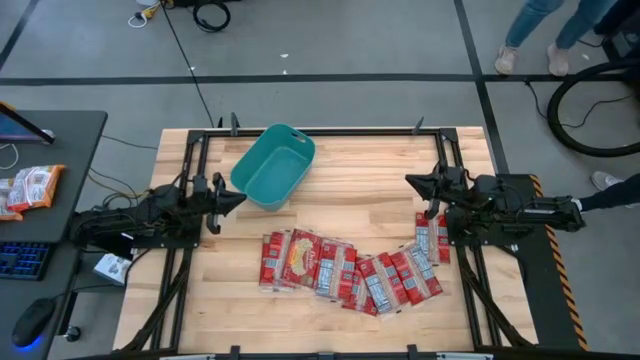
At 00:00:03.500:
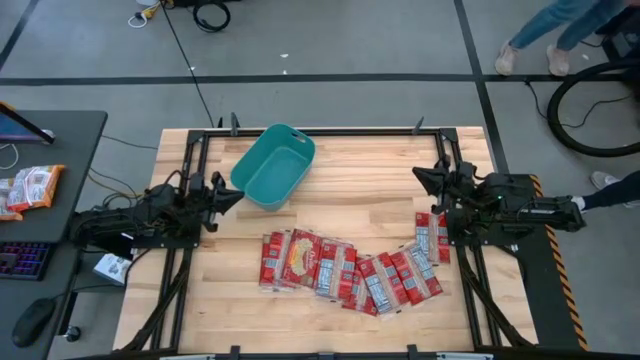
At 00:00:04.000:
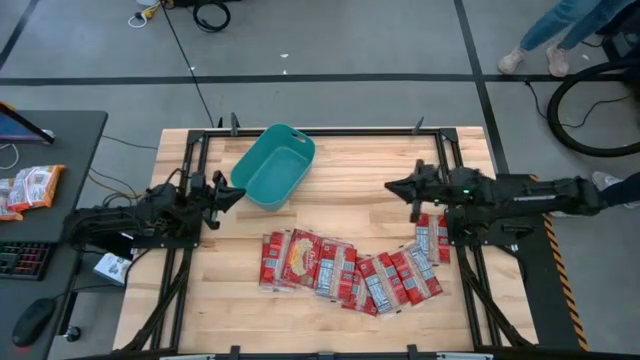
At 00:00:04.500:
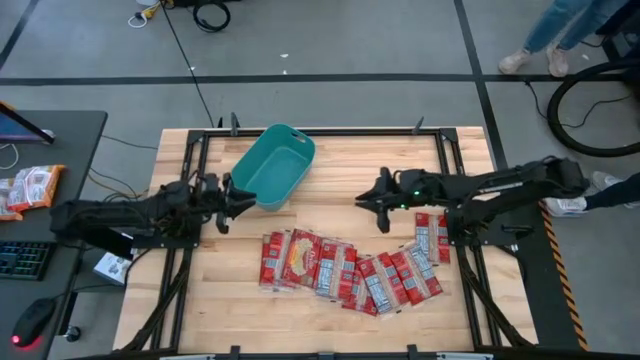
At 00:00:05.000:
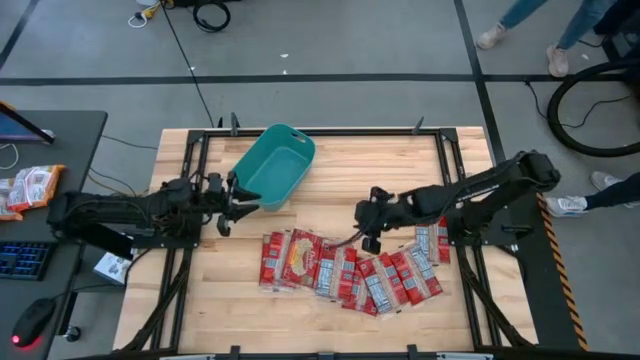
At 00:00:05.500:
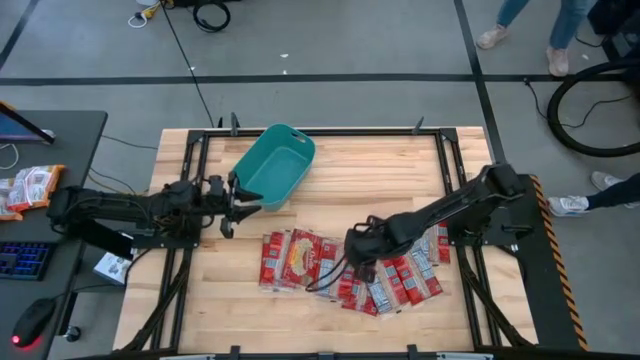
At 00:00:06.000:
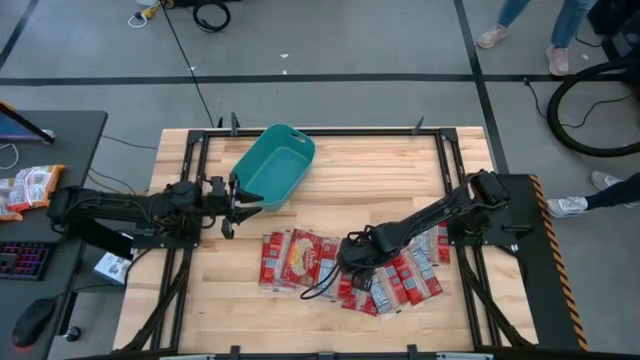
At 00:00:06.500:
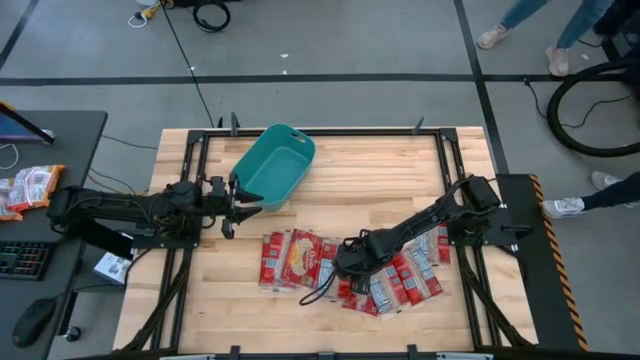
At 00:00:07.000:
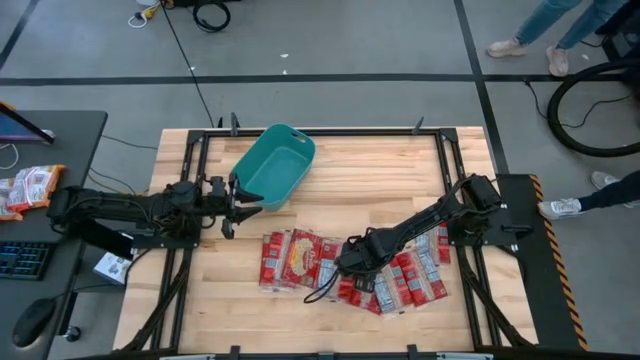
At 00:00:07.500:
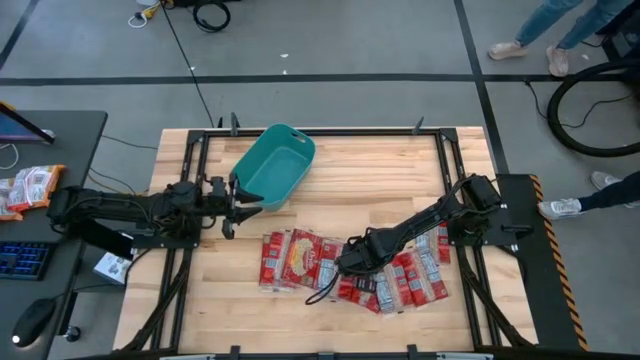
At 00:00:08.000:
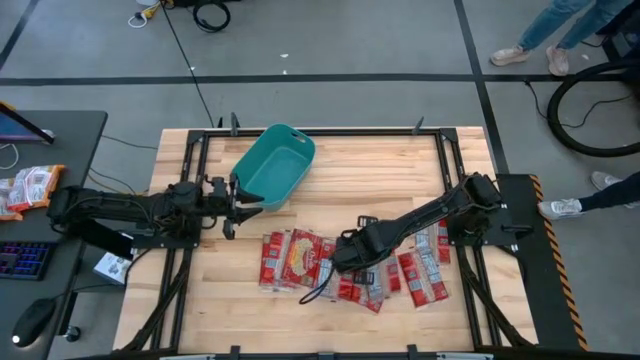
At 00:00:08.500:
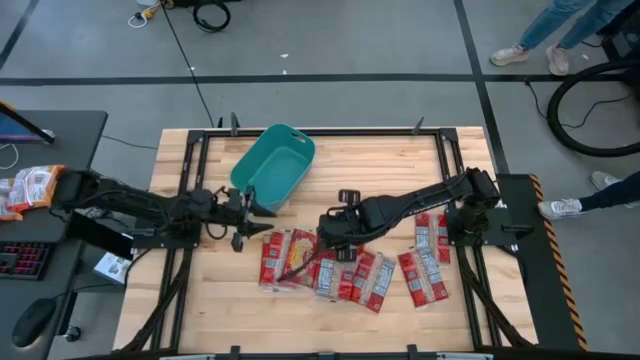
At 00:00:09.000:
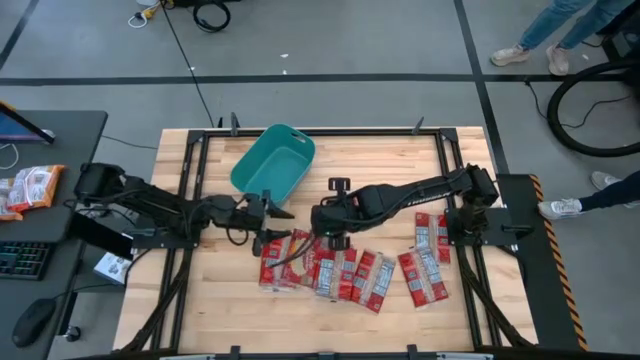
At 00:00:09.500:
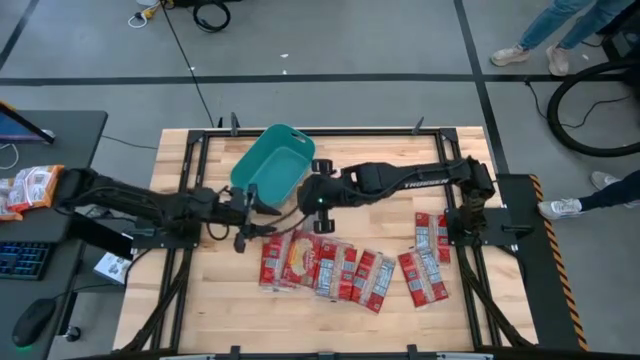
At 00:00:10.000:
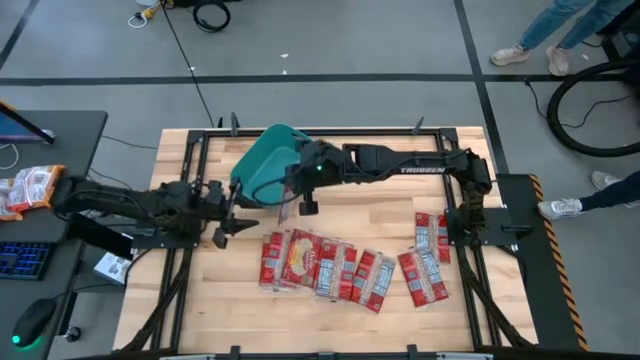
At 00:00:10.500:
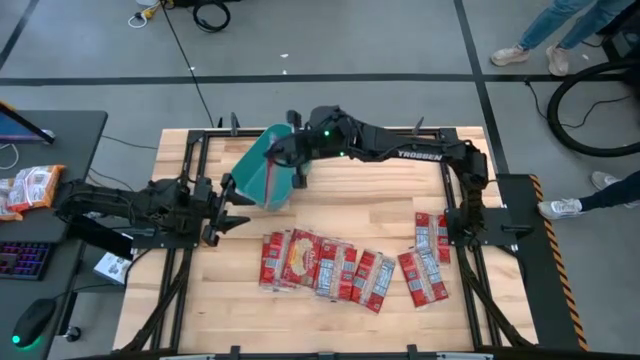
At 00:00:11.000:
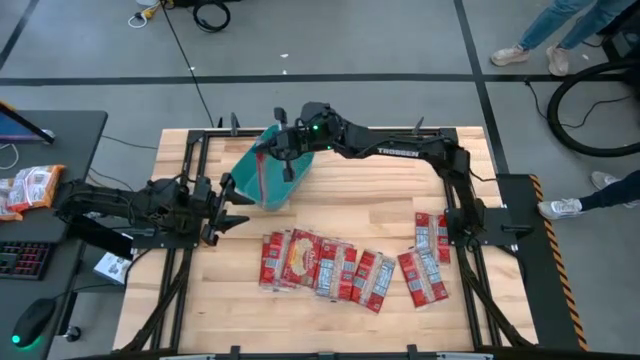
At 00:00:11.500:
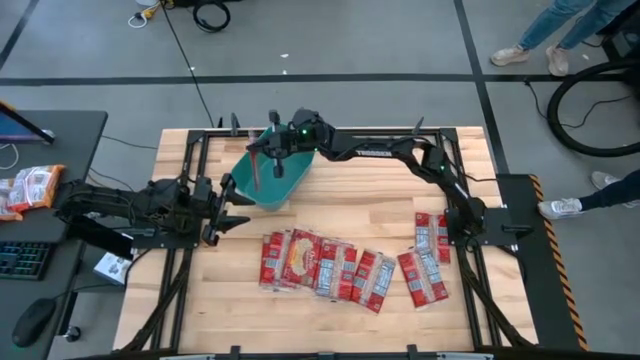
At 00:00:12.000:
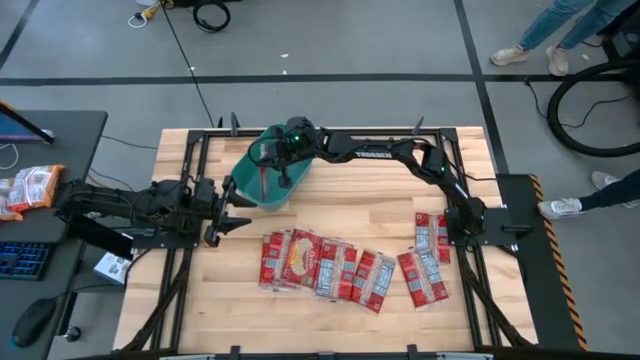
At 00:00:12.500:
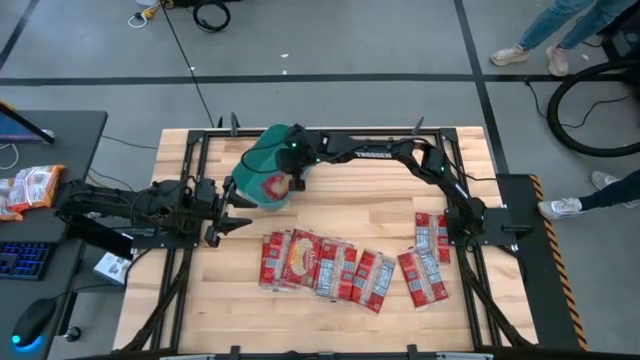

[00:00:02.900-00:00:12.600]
Task: Sort popcorn bags into baskets
Put the popcorn bag into the green bin

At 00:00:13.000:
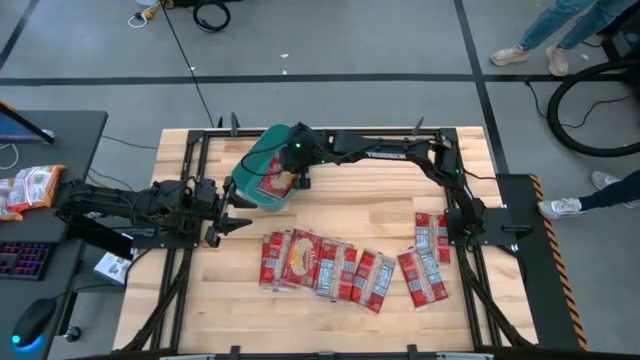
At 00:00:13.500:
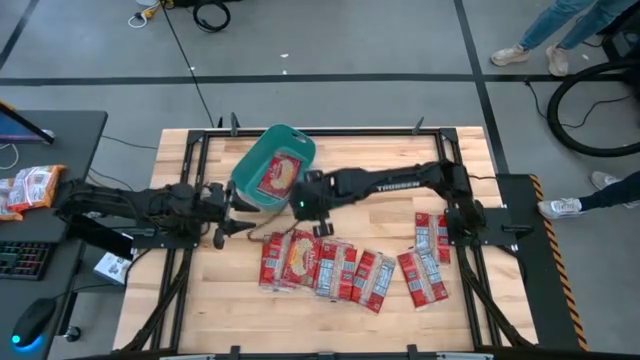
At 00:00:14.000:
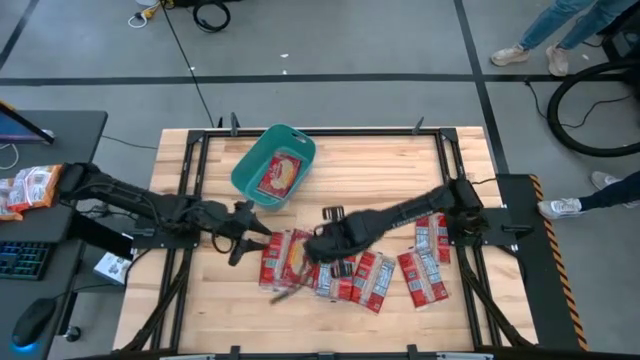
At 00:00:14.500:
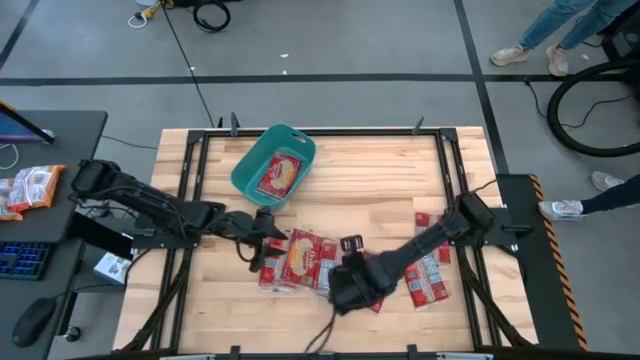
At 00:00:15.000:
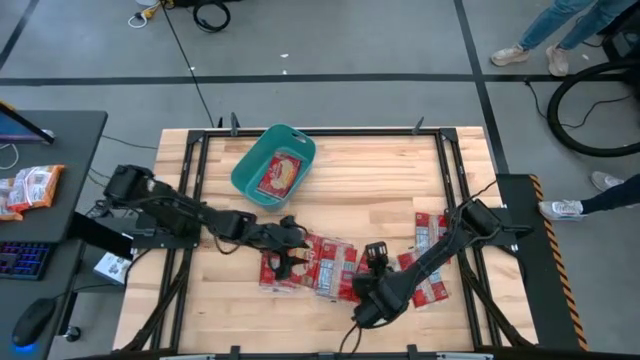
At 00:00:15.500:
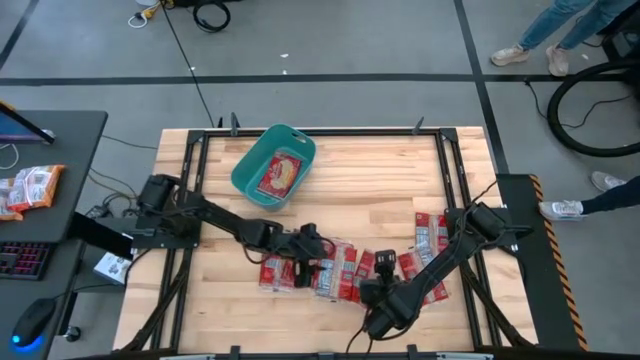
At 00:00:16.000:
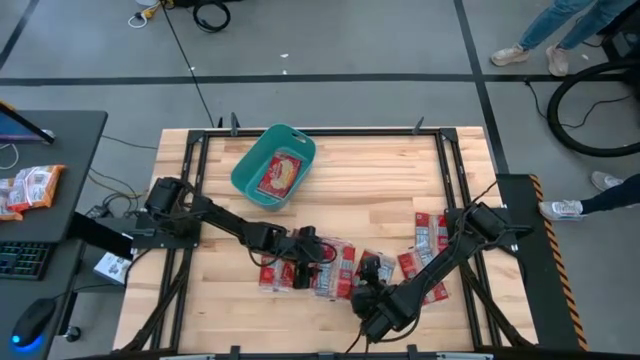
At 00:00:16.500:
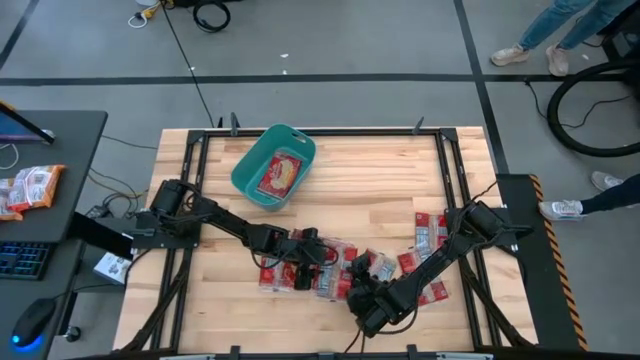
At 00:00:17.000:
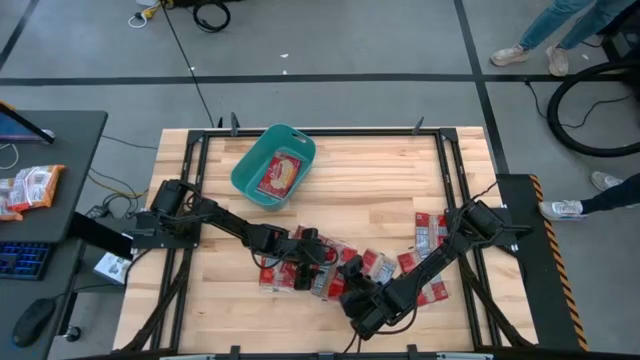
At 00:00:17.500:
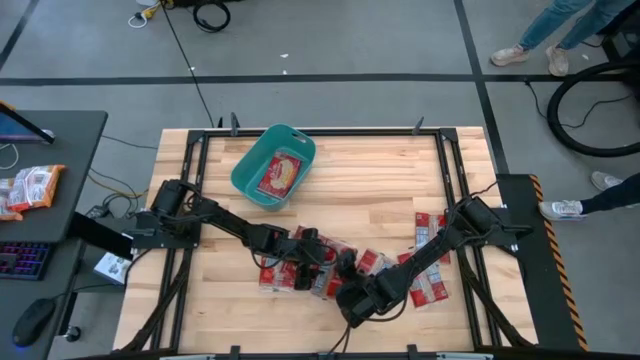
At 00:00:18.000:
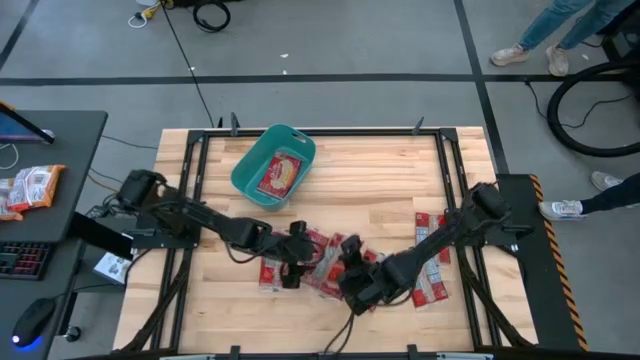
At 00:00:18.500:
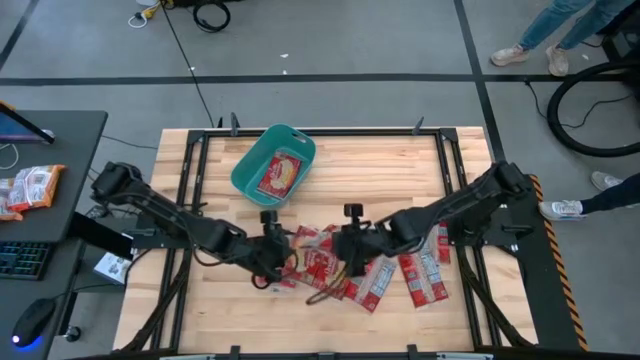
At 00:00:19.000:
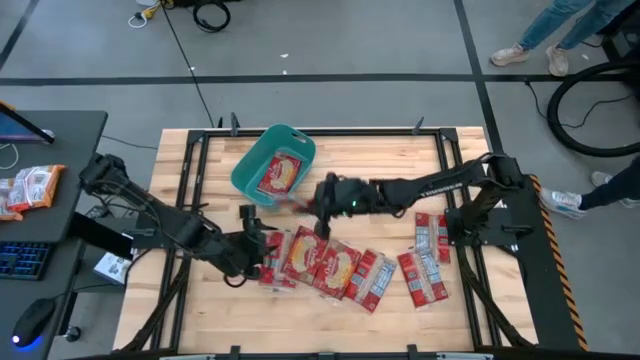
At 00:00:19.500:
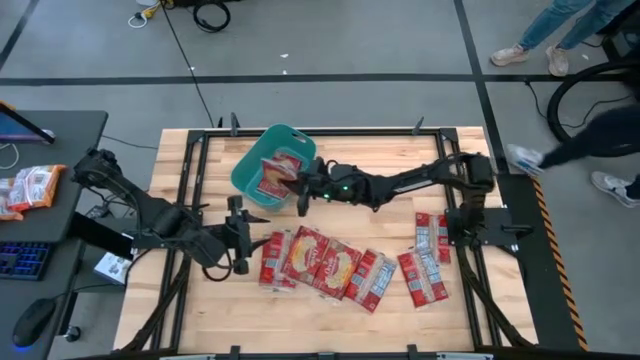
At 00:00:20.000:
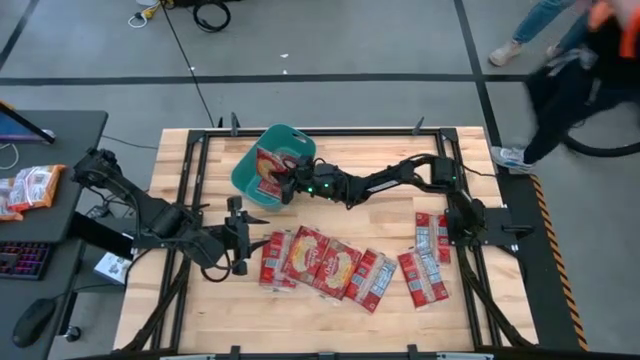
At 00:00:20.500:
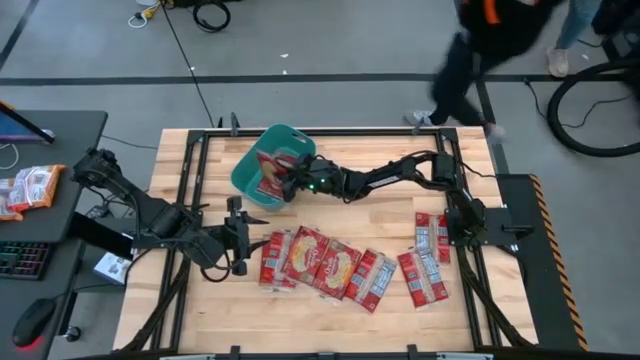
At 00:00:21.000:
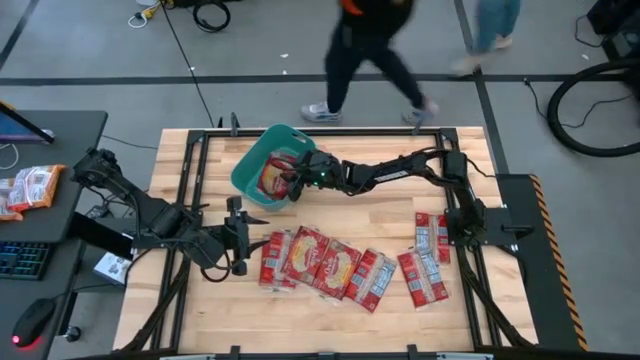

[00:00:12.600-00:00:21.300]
Put the popcorn bag into the green bin

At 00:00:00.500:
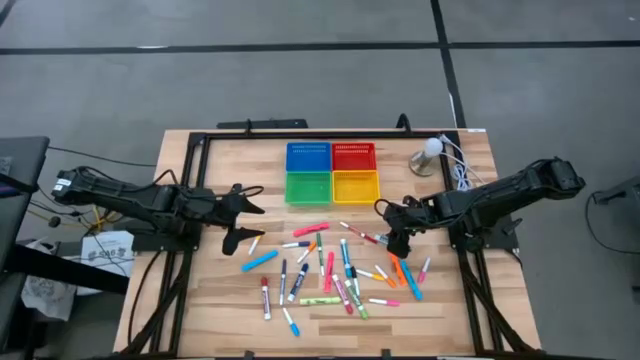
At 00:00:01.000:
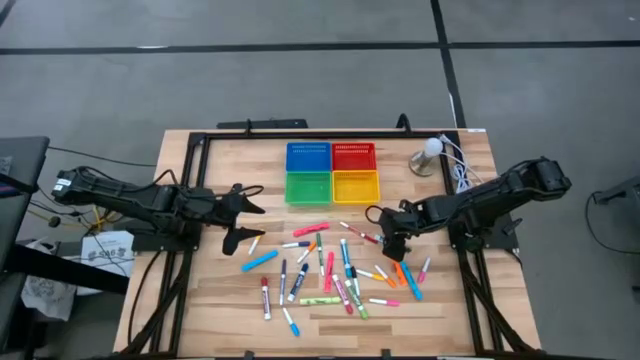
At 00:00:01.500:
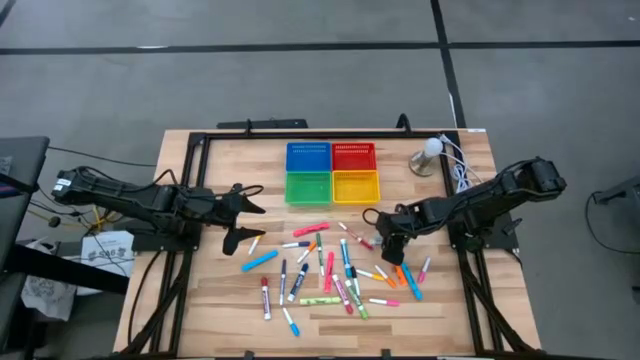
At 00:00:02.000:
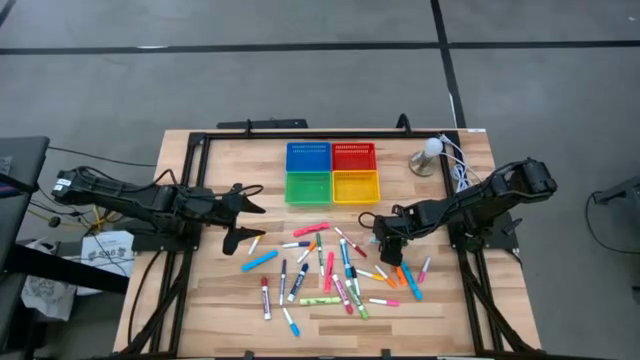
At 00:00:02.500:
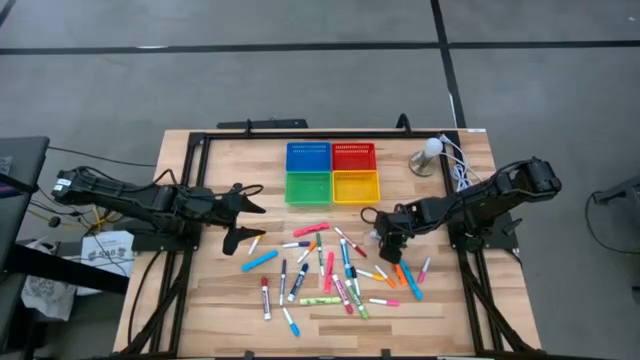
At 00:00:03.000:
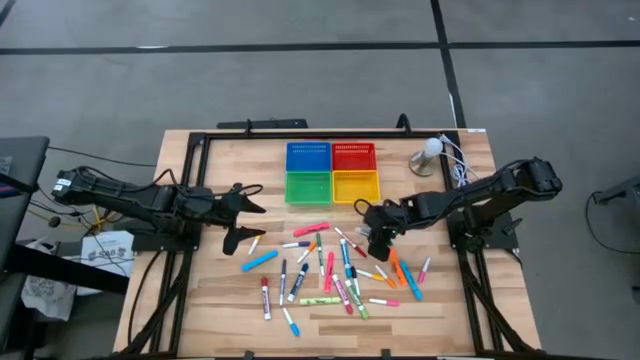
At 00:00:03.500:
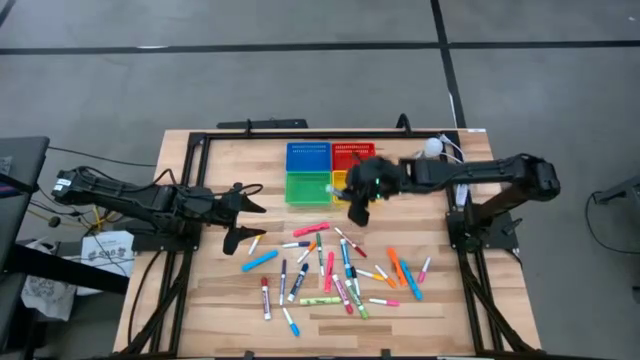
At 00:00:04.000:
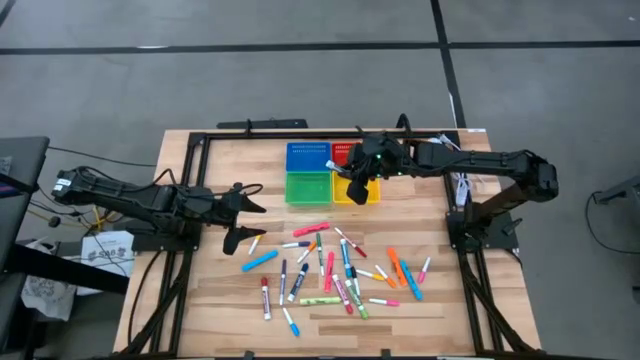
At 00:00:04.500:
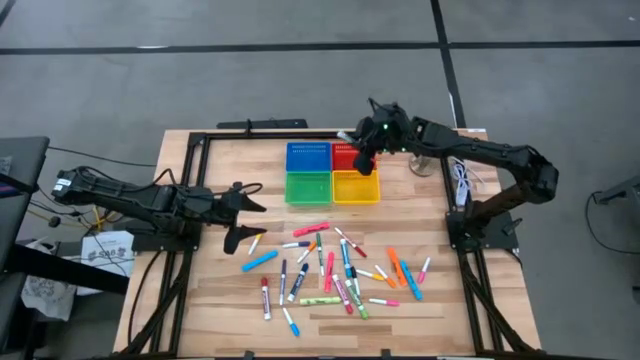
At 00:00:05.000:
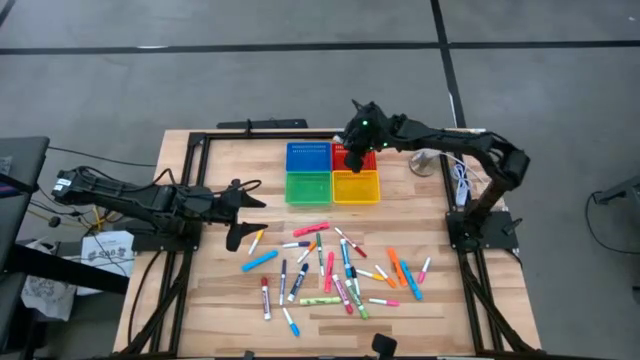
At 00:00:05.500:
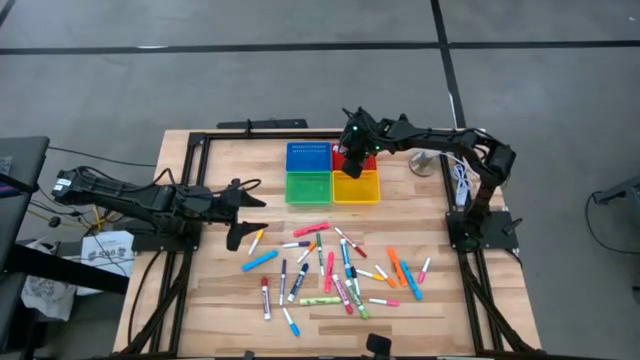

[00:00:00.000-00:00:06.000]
Task: Pick & Place Markers
Put the green thick dry erase marker into the red bin
